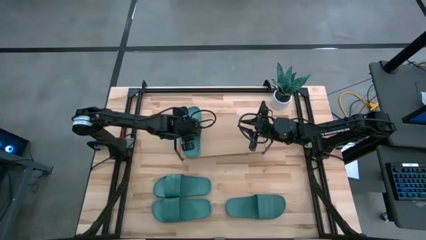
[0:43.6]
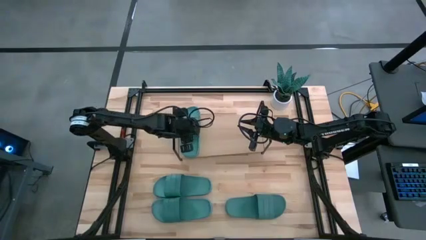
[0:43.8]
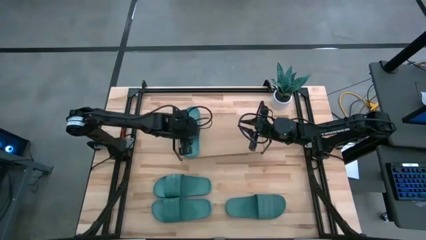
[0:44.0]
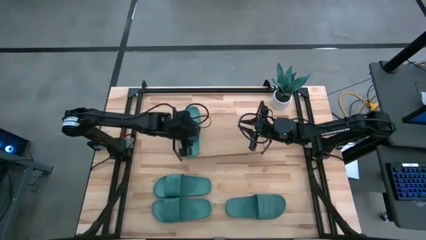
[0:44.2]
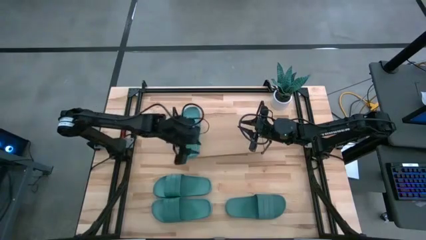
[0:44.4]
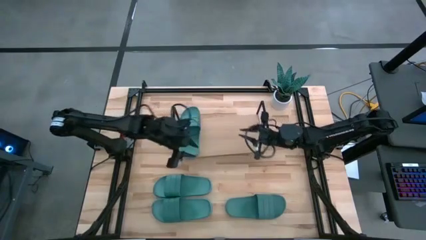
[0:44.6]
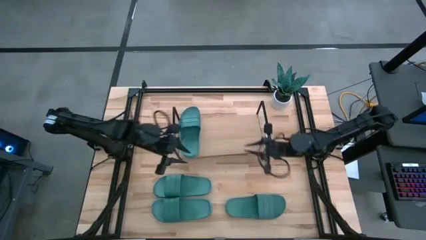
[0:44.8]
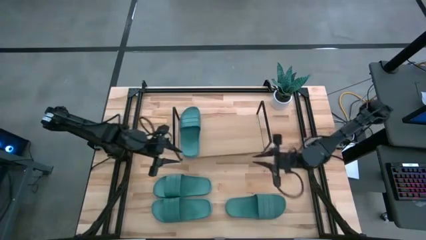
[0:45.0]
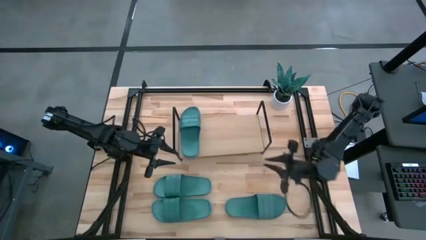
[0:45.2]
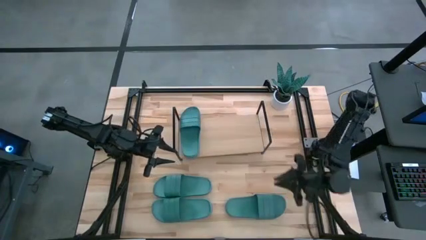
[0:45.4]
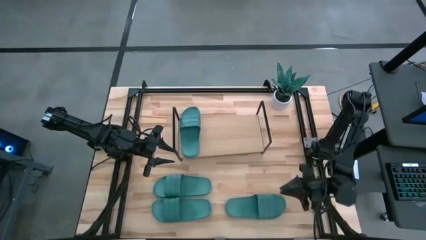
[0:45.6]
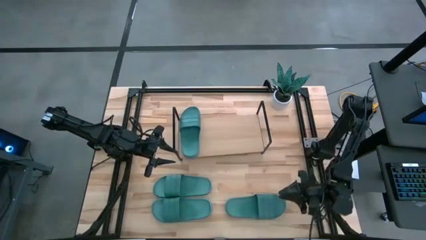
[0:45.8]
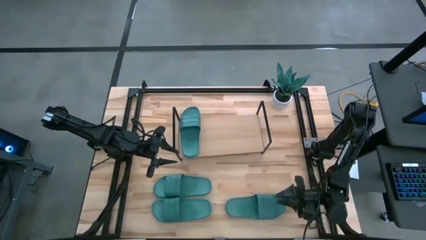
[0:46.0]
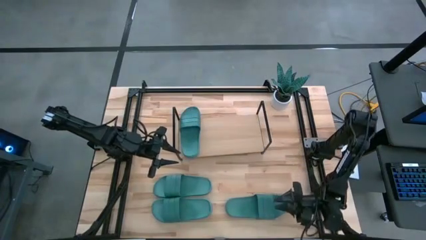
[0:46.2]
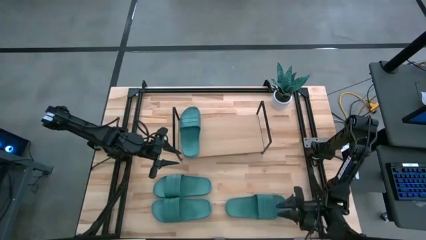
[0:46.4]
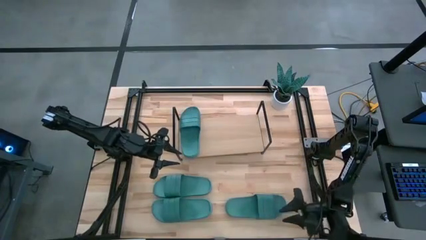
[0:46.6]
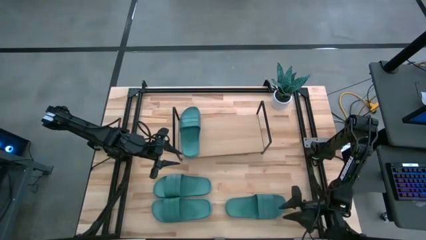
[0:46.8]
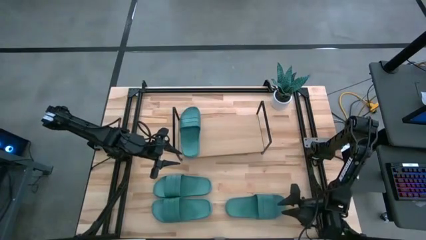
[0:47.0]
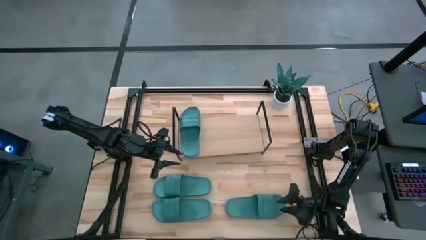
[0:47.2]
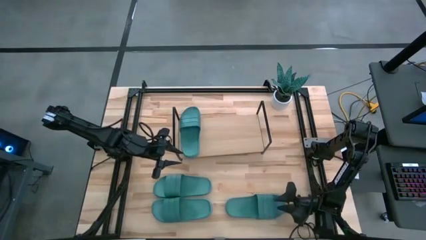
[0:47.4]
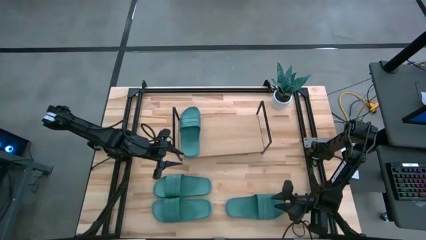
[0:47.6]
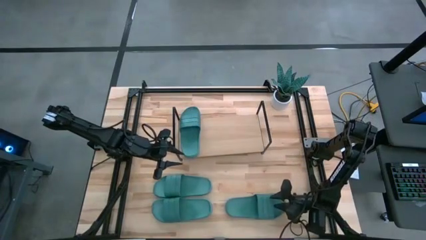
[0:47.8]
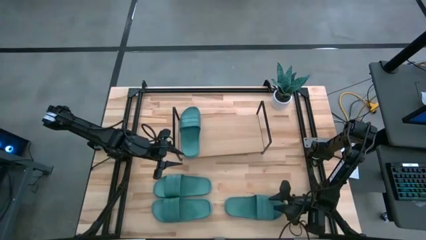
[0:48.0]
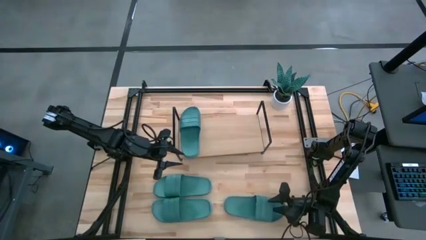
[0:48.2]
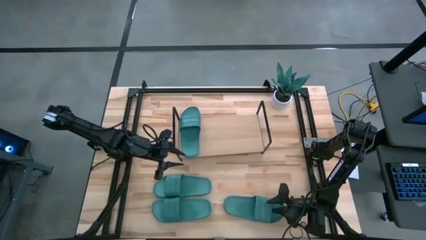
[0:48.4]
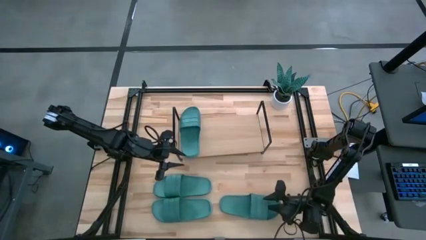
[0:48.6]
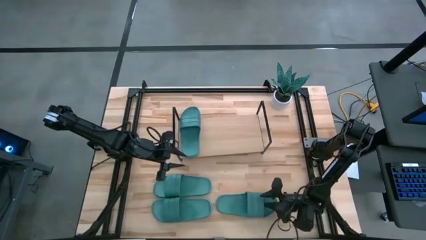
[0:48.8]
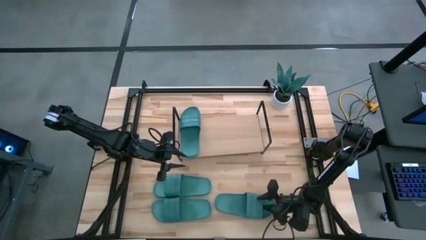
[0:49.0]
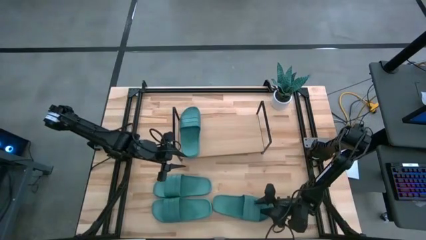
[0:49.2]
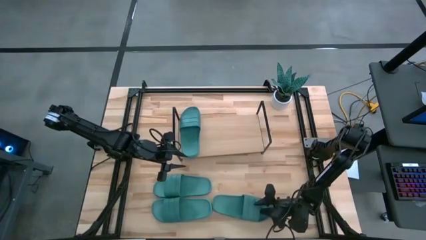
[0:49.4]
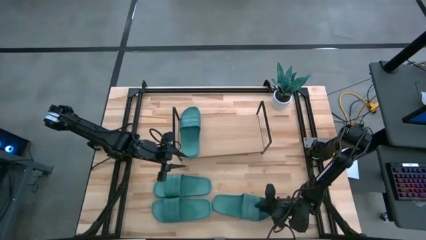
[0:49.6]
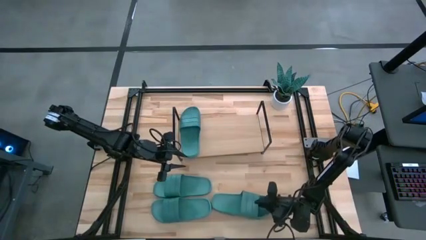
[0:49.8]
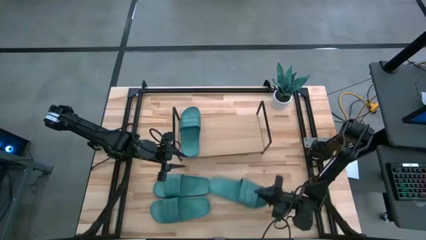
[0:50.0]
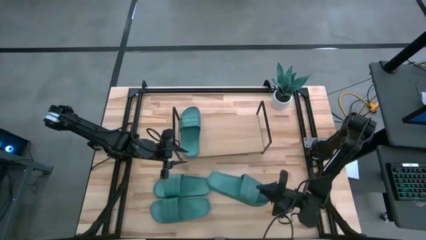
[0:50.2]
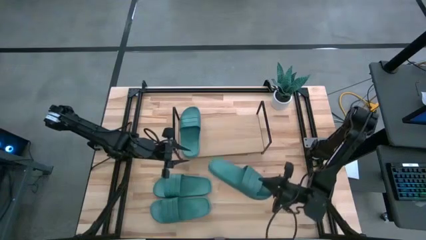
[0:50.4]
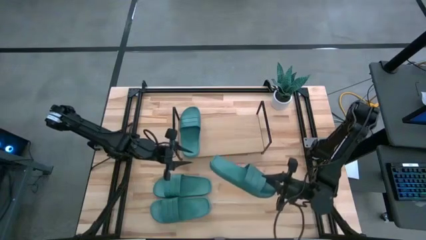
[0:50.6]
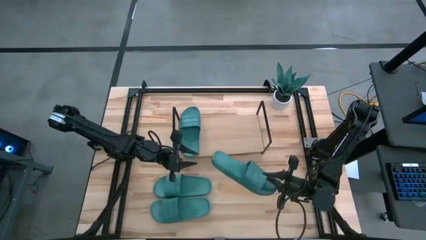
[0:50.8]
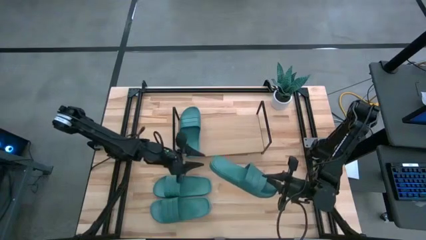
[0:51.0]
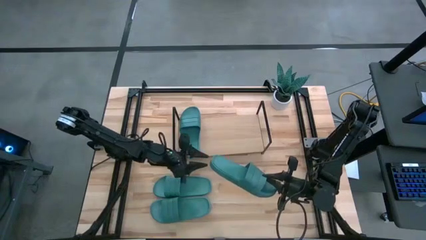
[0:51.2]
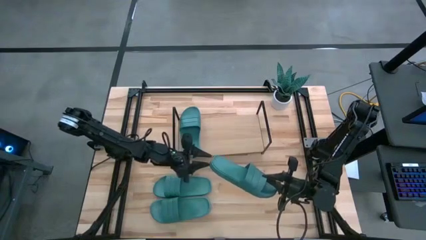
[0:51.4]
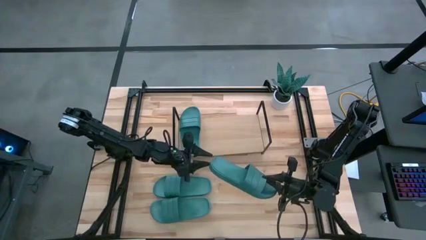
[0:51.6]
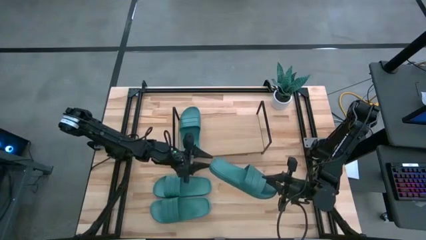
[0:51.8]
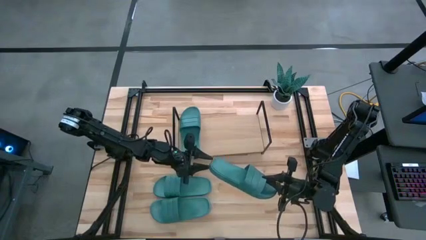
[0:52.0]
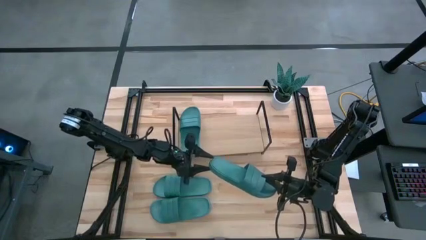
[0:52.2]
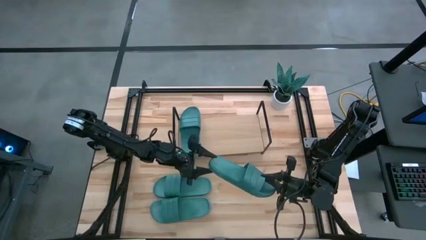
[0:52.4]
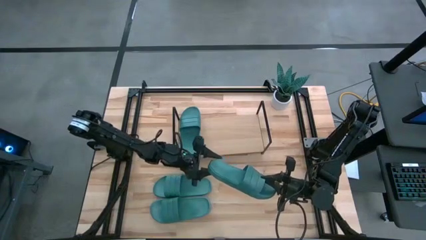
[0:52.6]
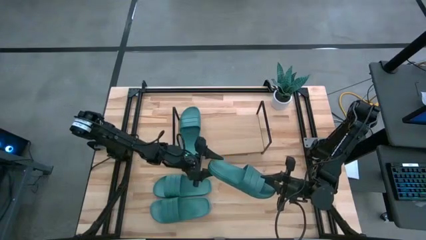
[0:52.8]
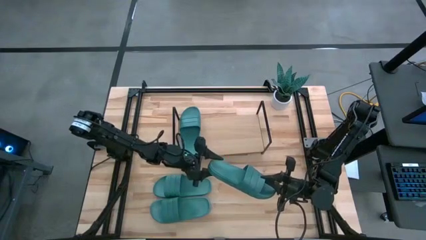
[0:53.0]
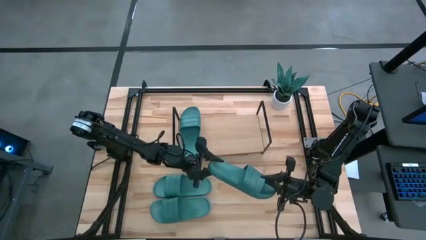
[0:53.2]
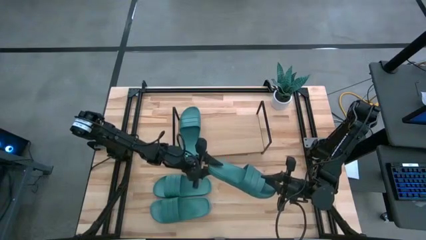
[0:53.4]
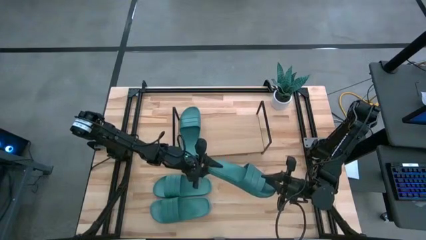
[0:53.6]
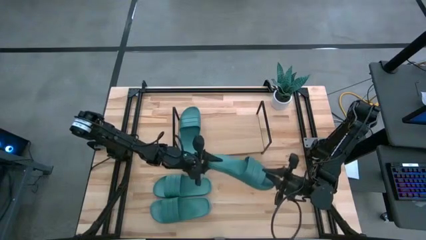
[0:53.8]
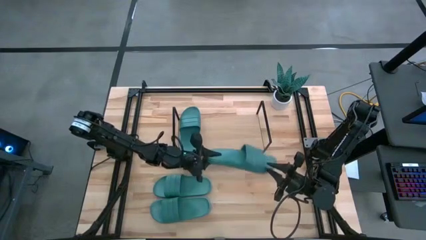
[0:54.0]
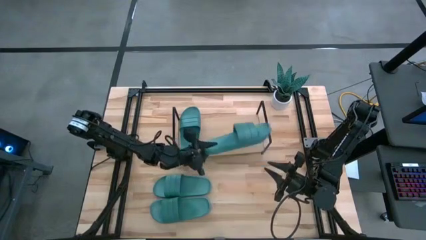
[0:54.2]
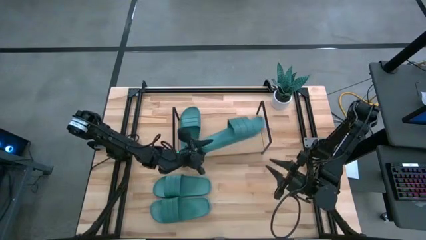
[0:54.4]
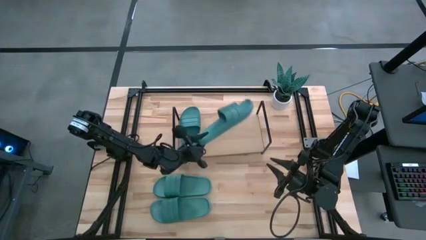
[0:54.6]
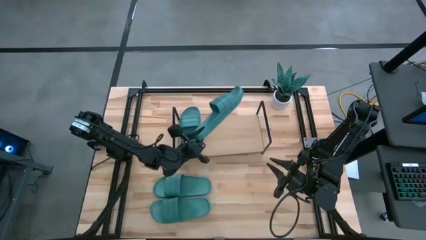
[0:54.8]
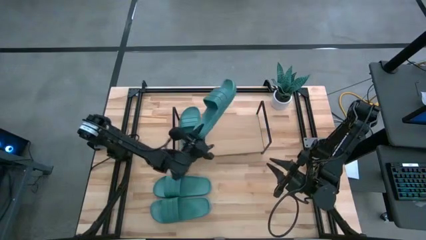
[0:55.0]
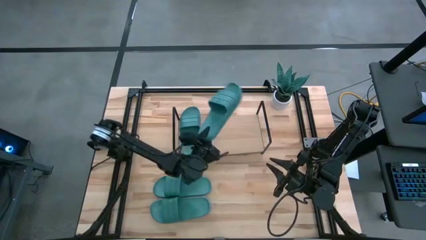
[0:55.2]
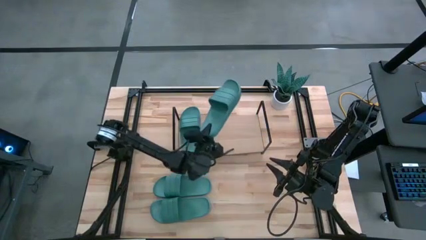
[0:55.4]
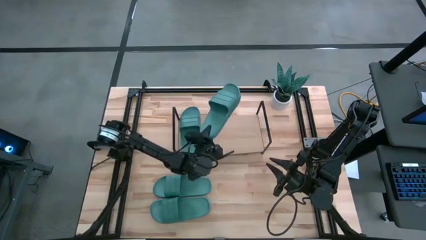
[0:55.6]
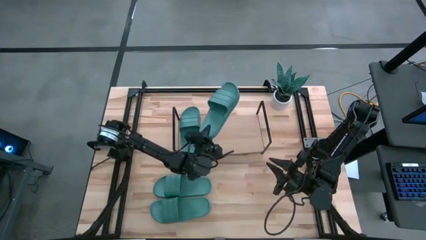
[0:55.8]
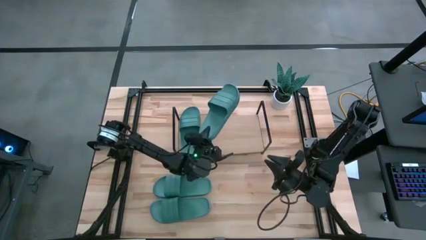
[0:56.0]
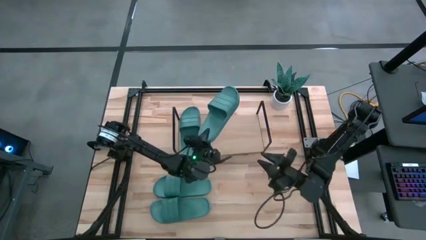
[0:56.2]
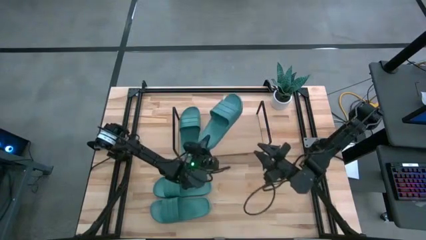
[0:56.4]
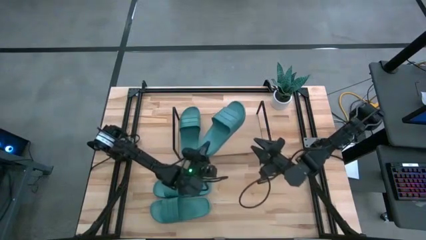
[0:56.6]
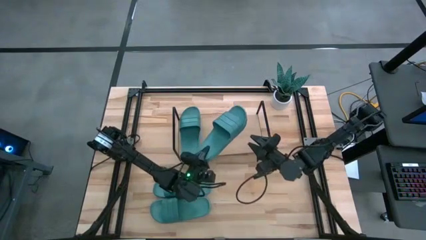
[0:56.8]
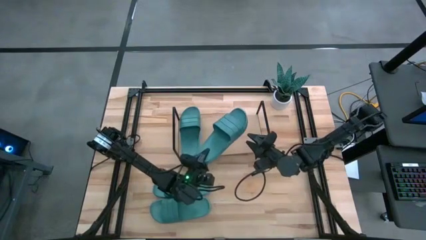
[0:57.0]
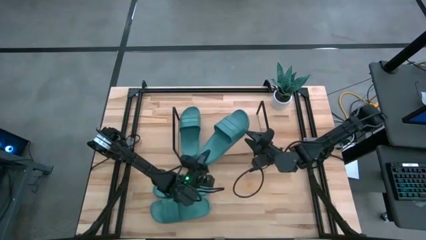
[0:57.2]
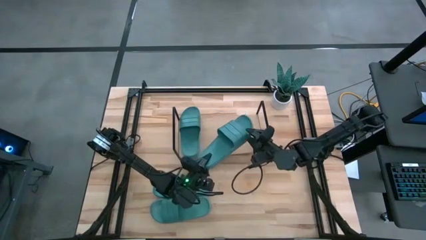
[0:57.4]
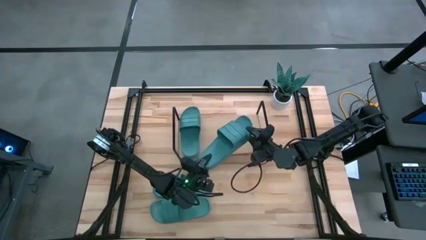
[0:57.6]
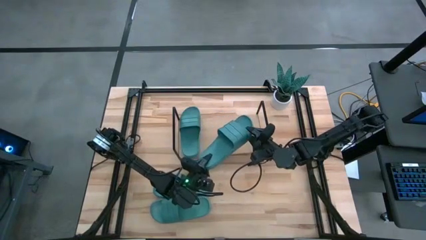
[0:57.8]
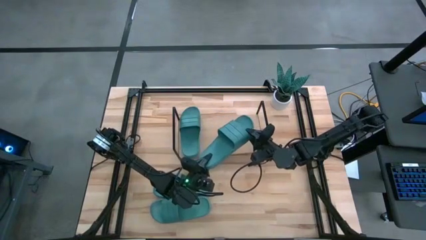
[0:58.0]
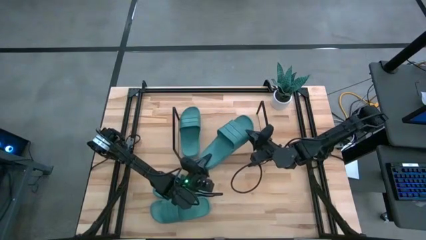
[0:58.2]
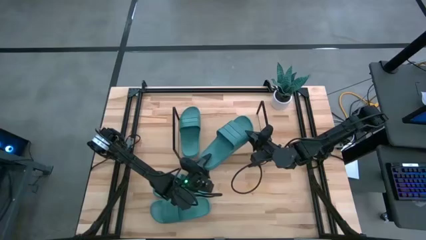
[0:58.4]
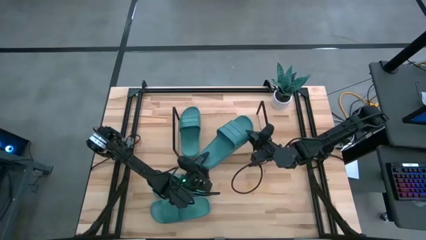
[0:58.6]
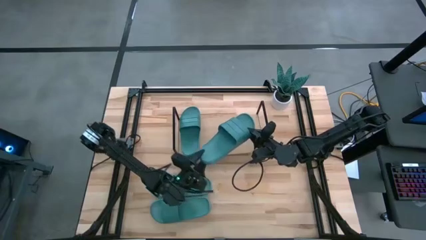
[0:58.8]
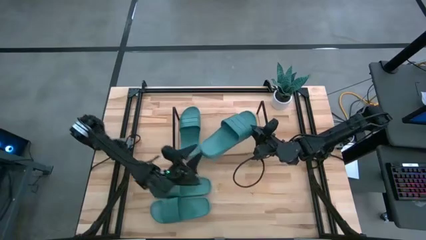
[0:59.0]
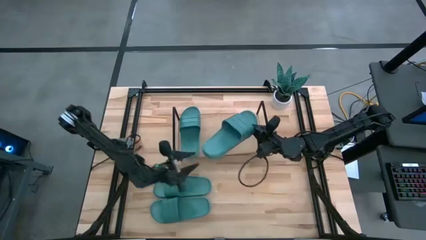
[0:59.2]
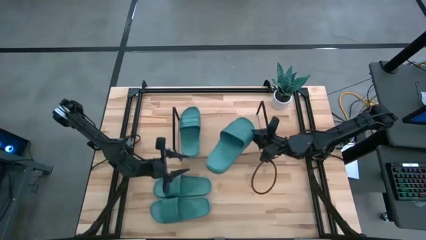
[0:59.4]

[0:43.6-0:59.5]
Task: Pick and place slides into the shelf
Put the green slipper on the shelf
